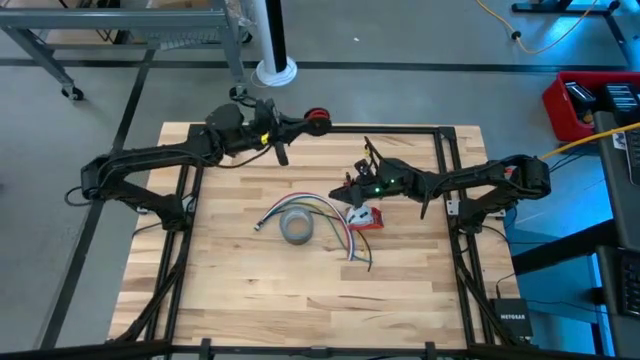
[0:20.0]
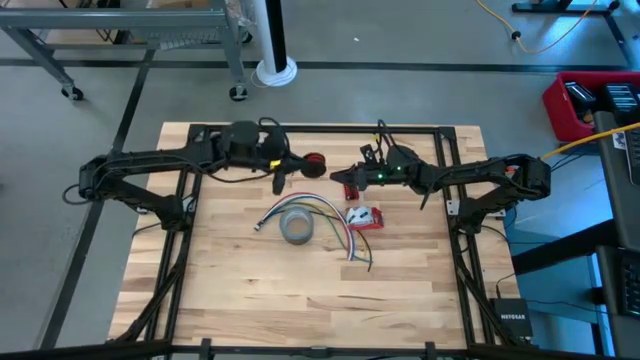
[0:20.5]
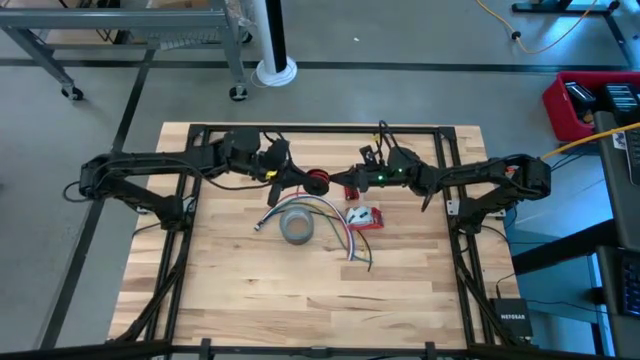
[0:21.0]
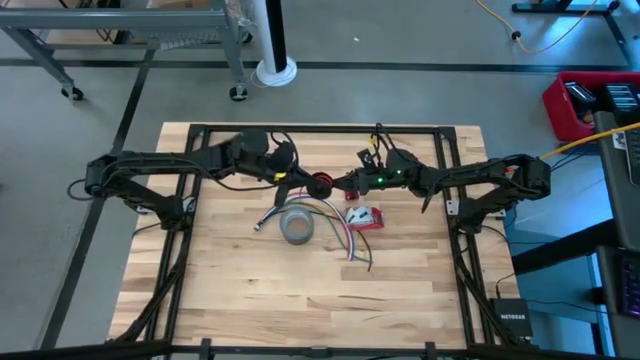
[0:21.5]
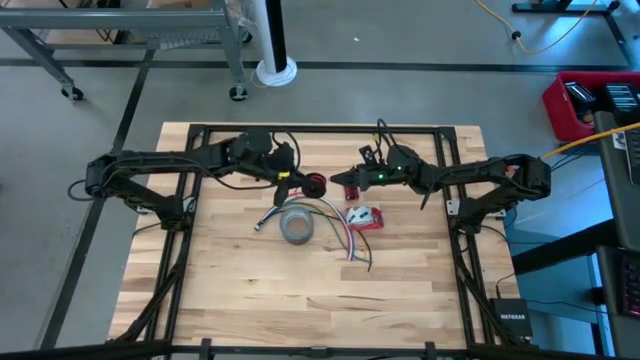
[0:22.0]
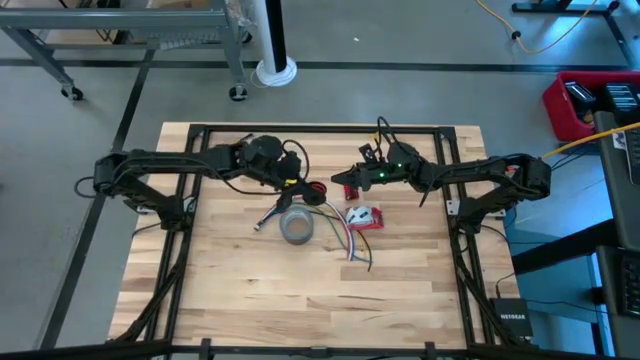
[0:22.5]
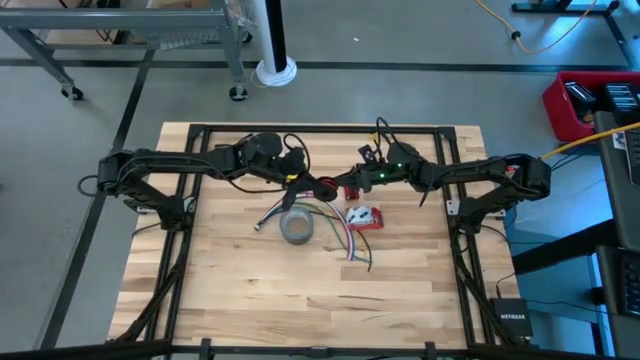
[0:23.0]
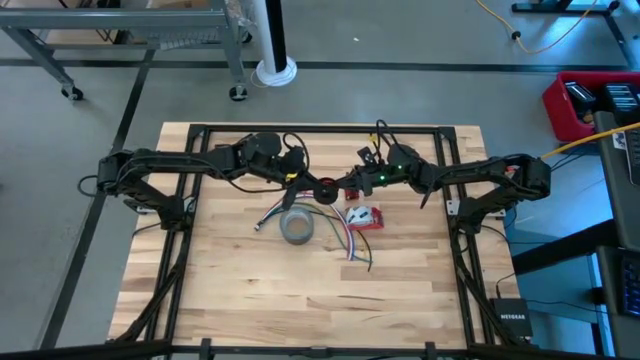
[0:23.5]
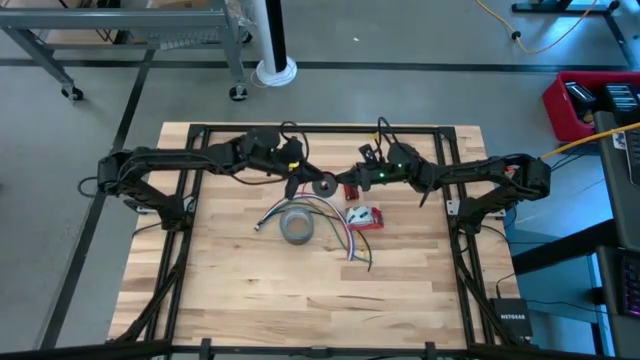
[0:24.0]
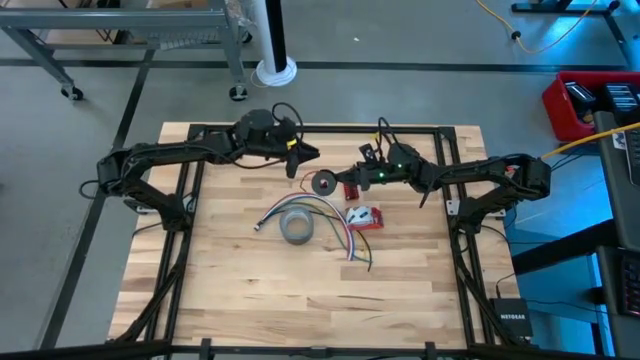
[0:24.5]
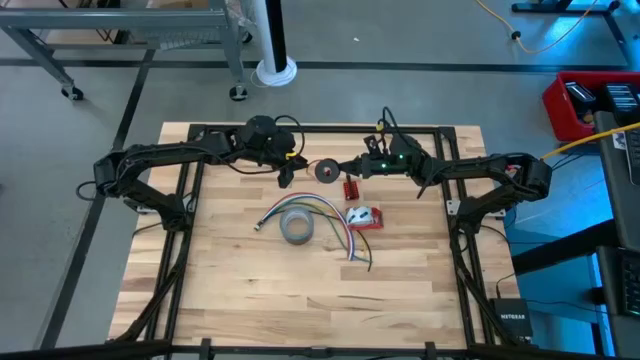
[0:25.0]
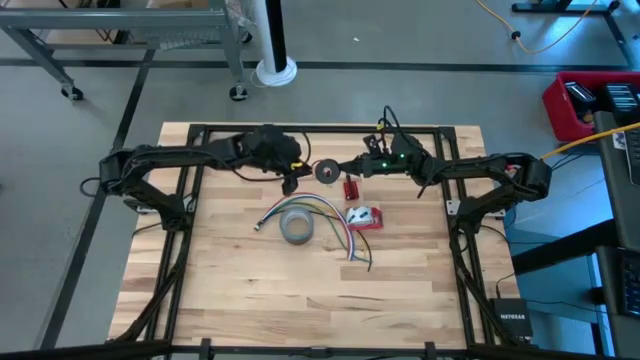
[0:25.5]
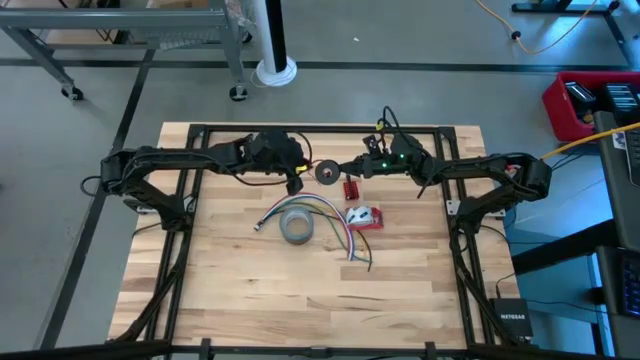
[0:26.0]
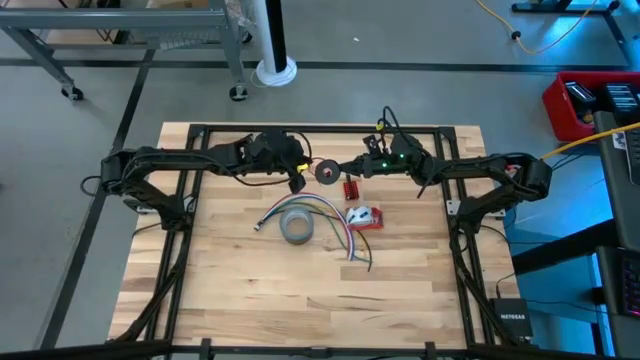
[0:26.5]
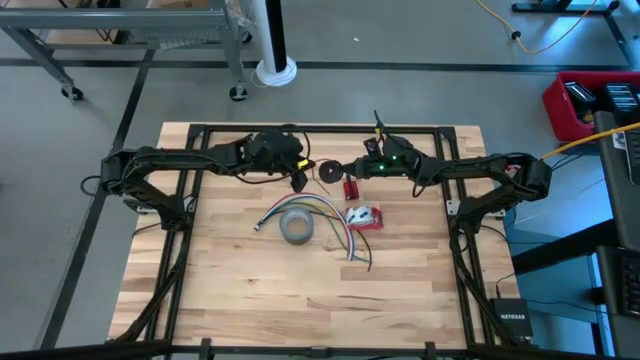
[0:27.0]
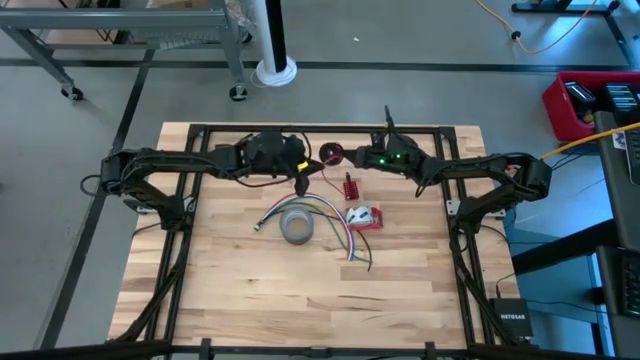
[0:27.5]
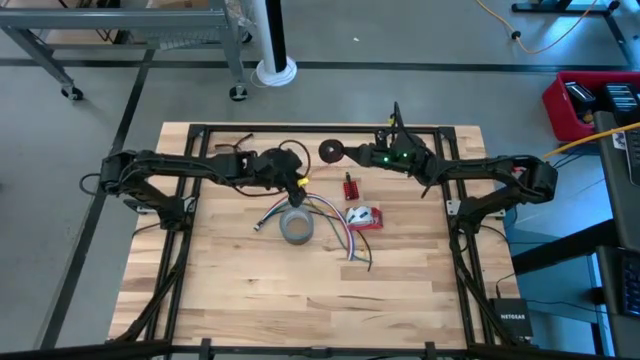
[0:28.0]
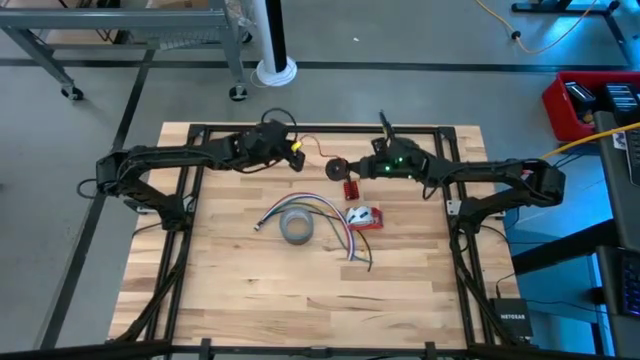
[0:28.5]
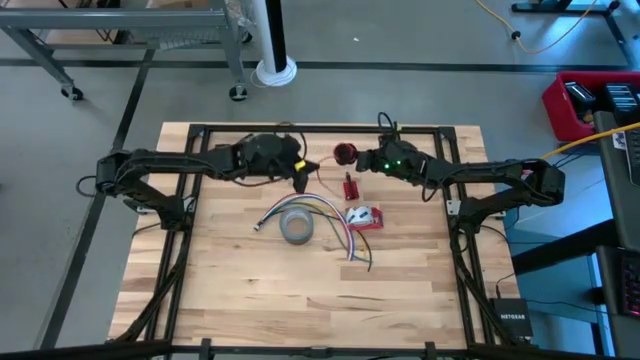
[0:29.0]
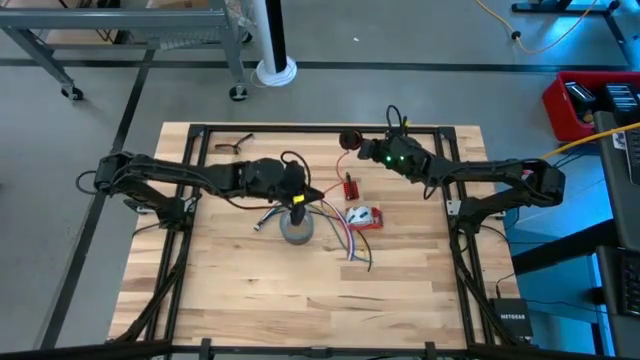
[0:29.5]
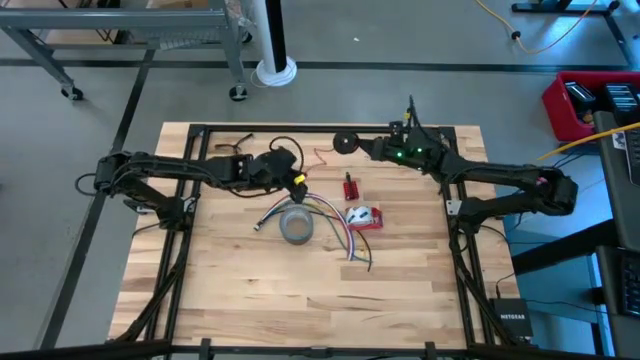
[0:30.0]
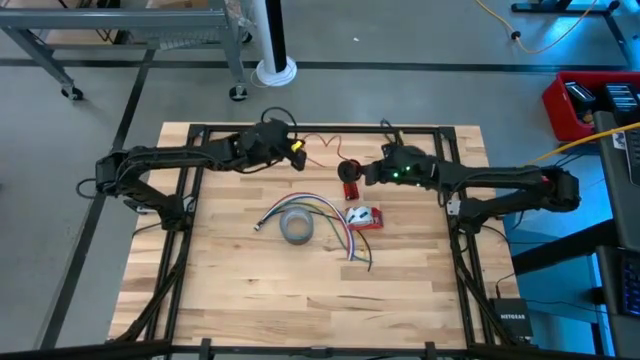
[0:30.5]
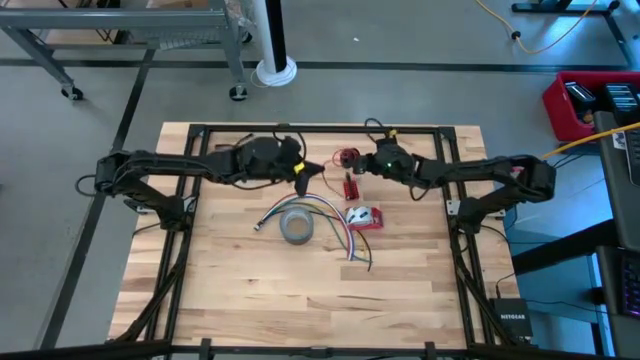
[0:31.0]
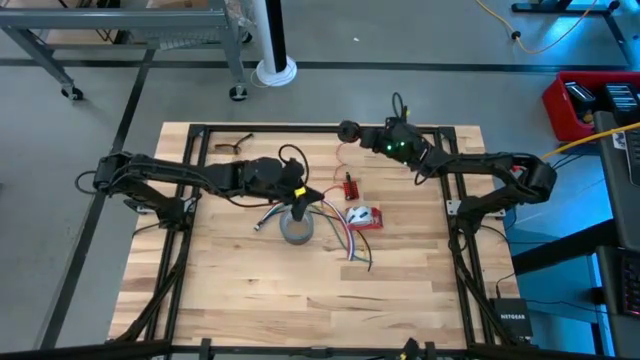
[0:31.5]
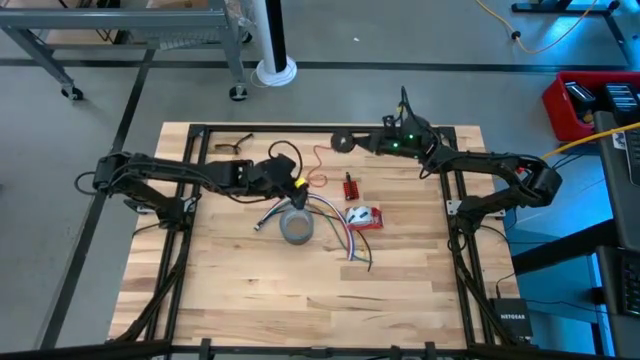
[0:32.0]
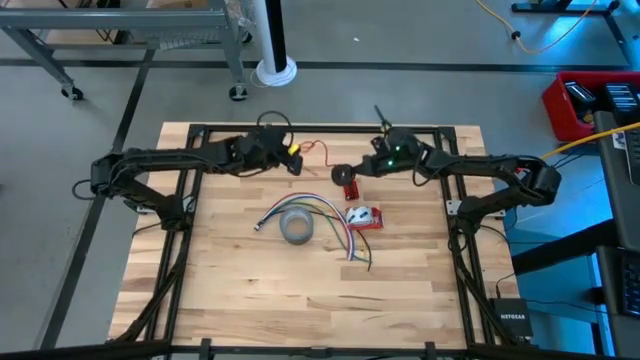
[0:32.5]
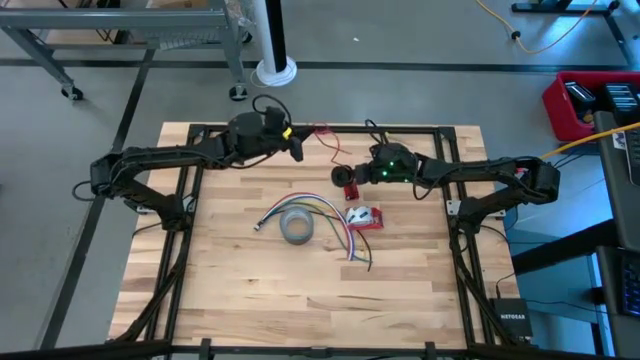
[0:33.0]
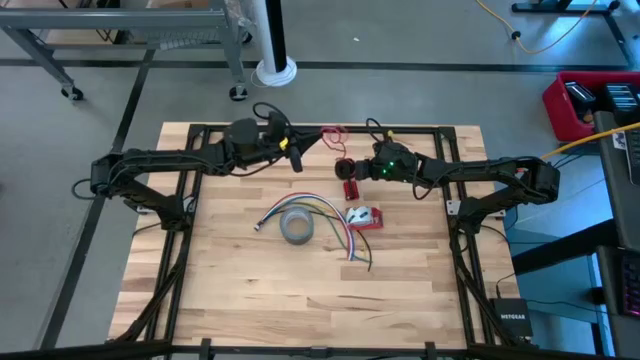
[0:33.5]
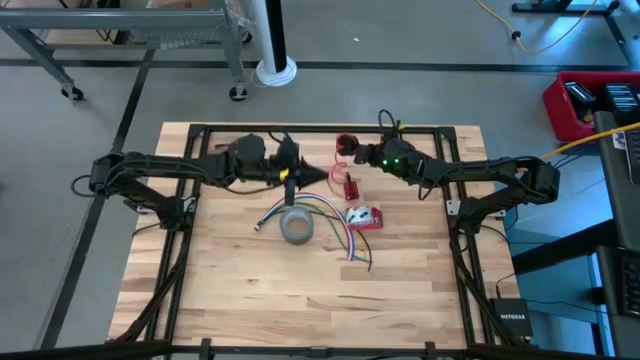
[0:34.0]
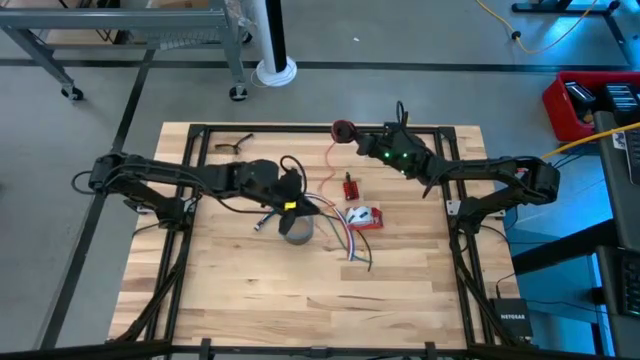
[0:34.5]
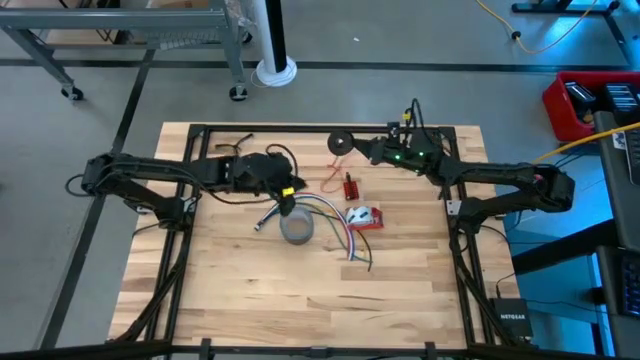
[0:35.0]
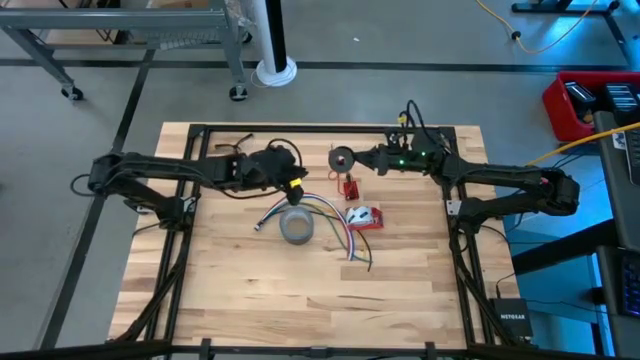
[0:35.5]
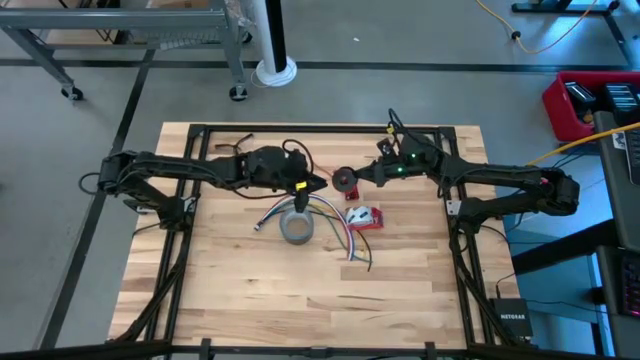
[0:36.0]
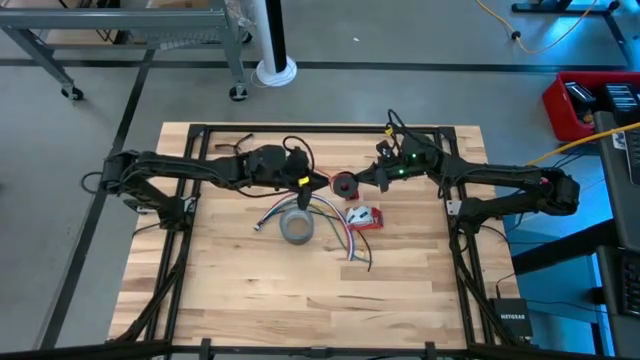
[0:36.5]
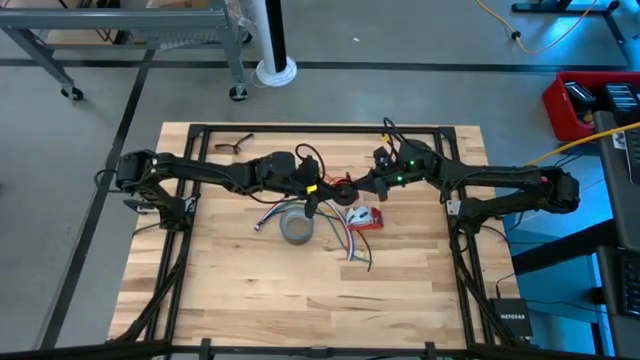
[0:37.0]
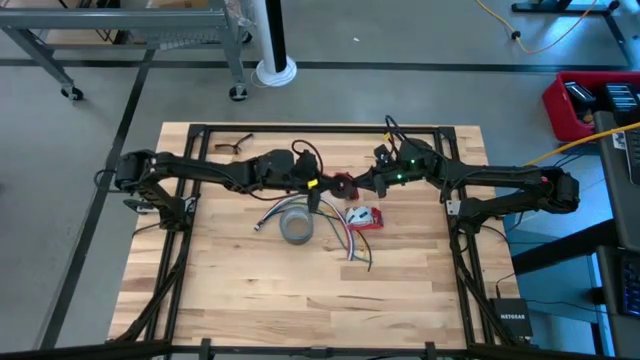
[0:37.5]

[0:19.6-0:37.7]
Task: Coil cords
Uncoil the red wire from the black spool

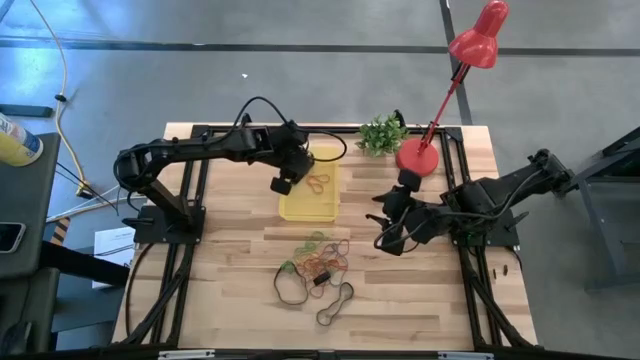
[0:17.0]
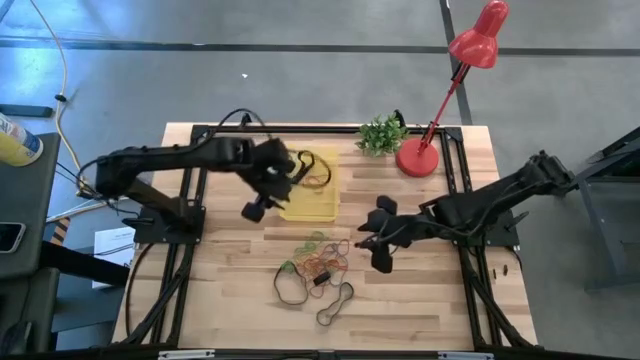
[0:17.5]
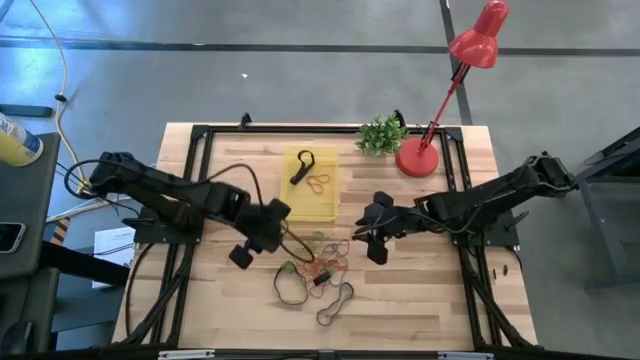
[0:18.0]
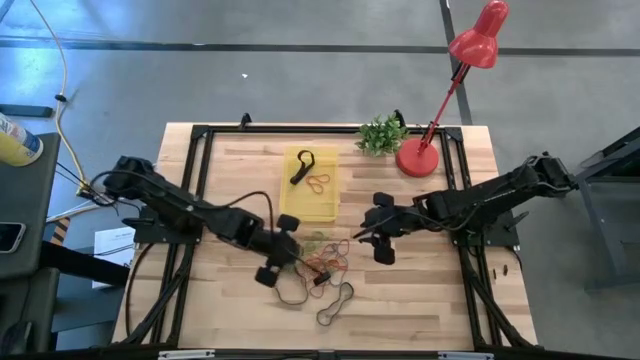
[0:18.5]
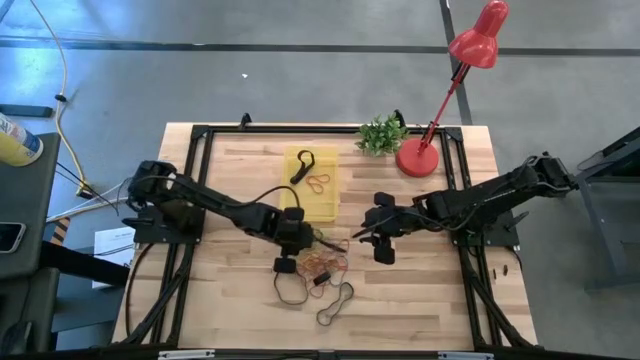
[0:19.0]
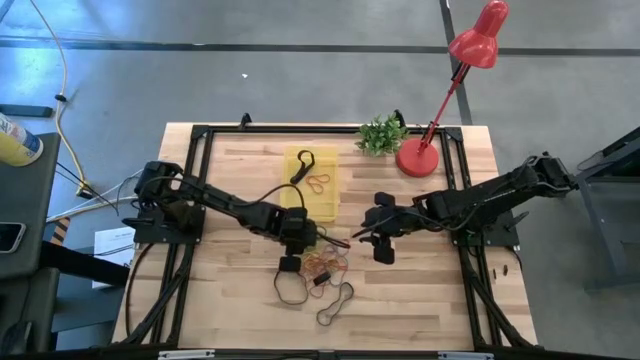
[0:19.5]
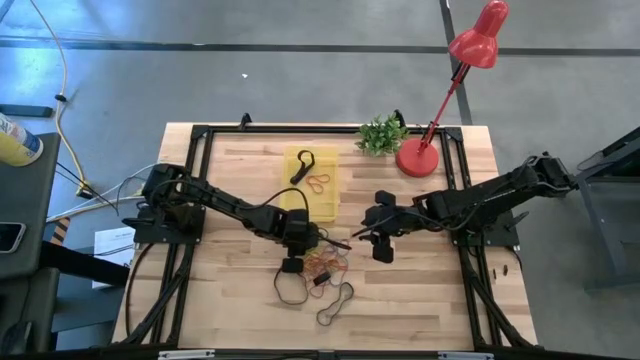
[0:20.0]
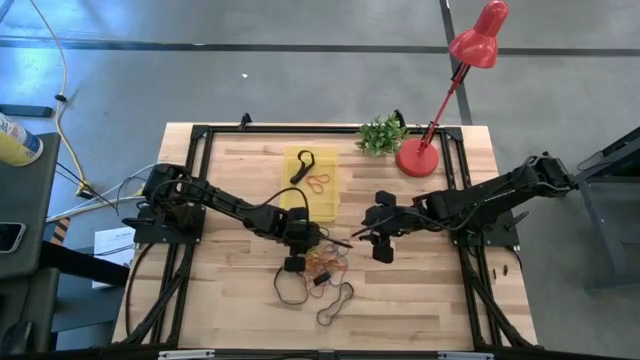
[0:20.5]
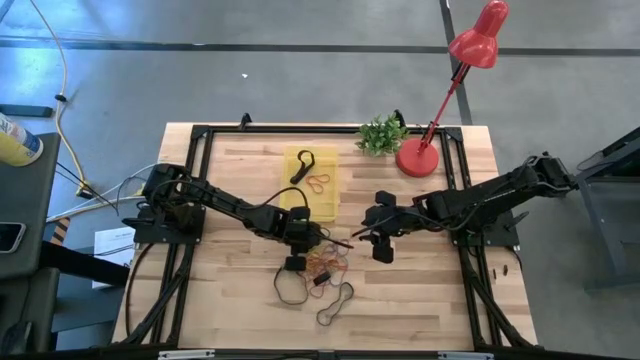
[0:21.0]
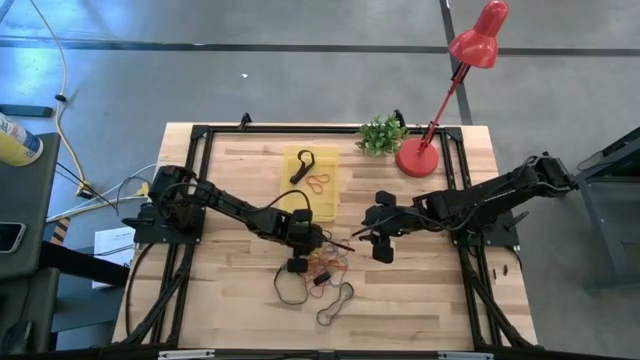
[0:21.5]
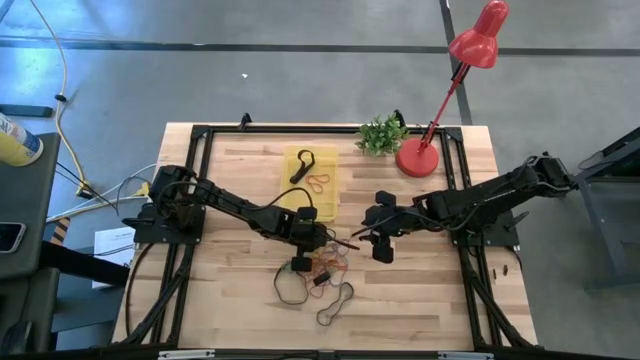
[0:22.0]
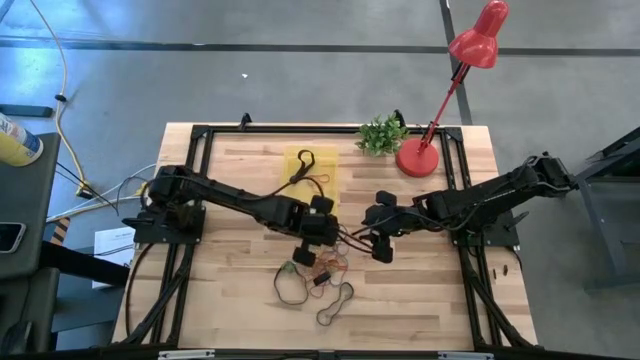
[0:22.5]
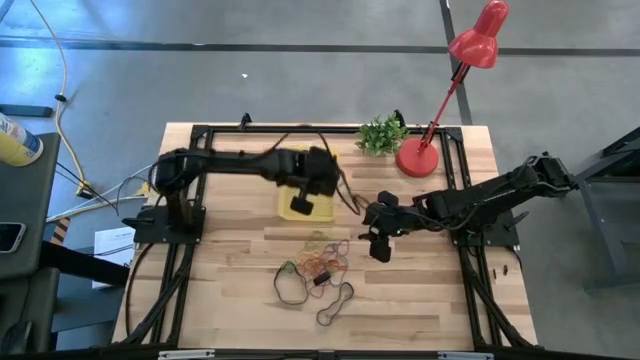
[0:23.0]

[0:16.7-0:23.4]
Task: Pick and place rubber bands into bin
Put the green rubber band into the yellow bin
